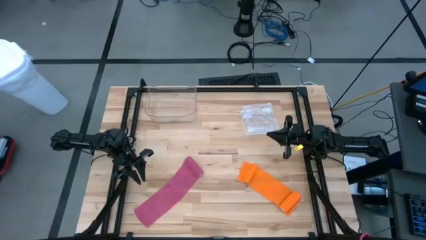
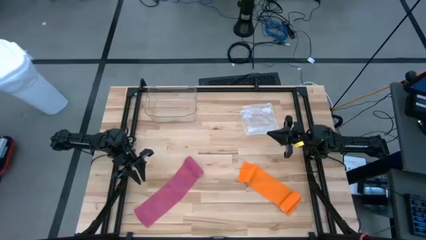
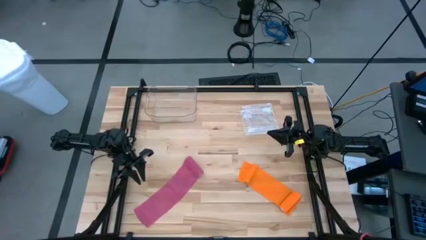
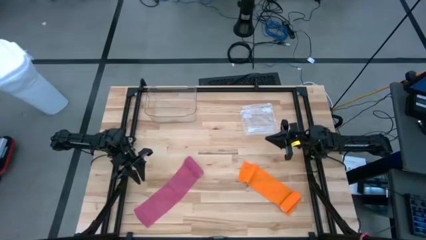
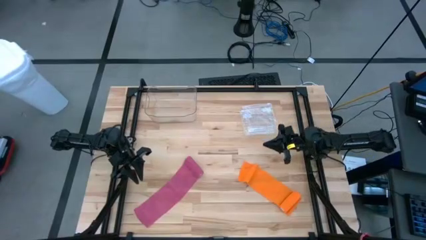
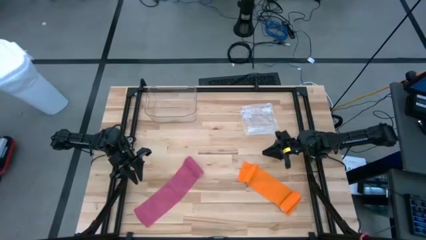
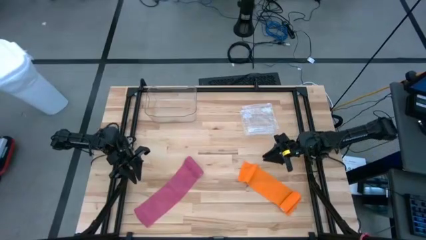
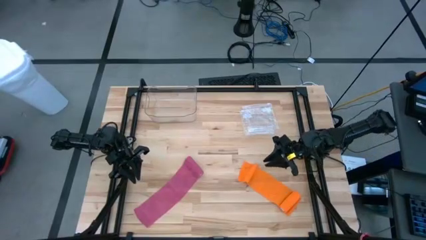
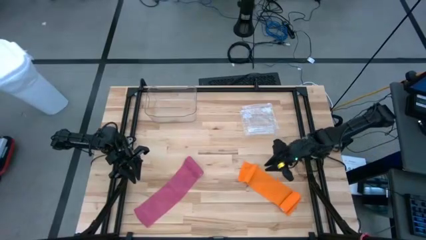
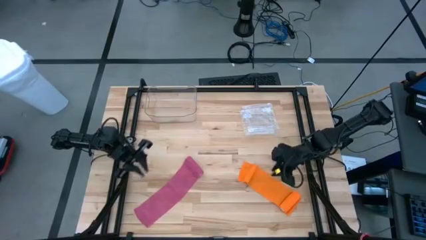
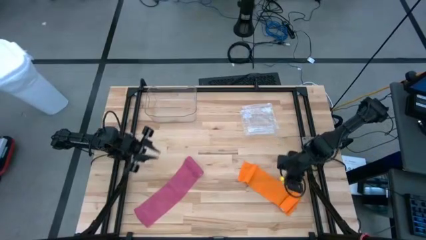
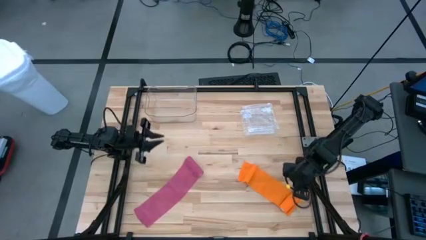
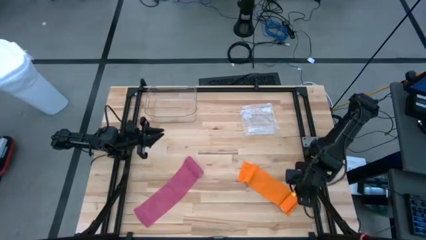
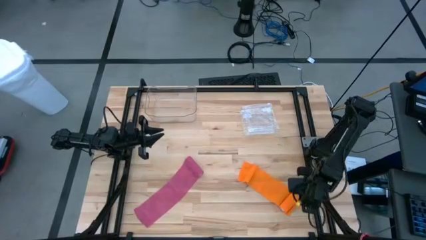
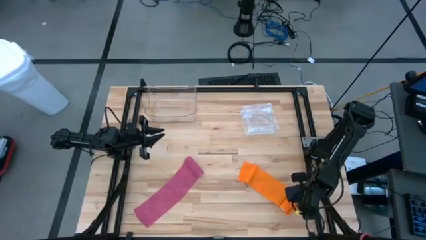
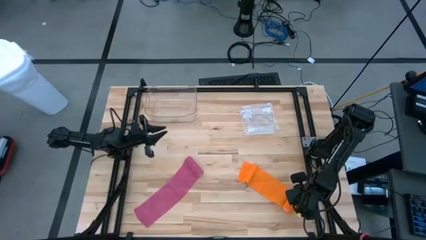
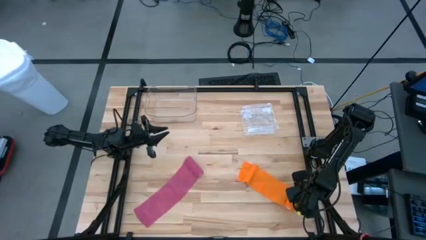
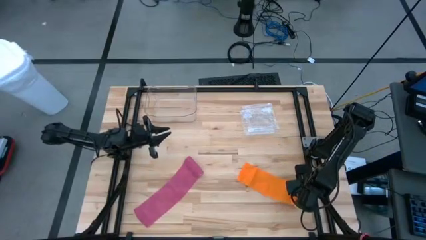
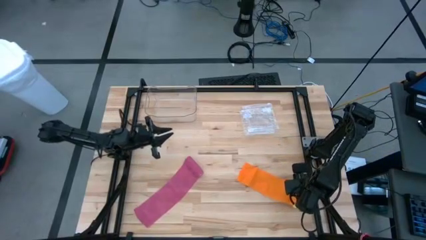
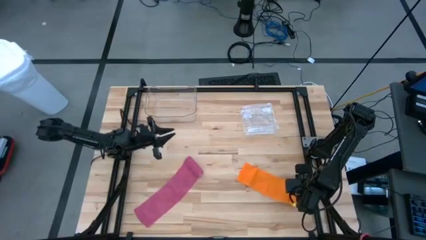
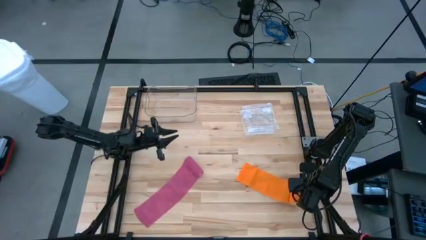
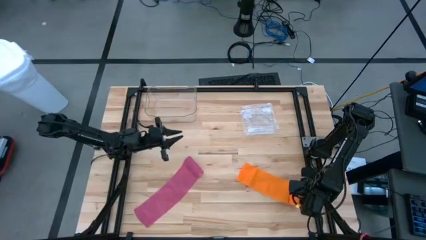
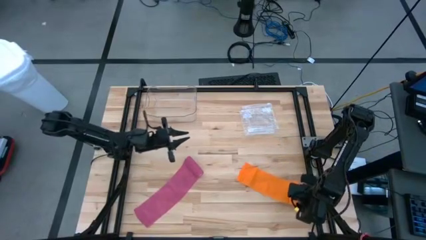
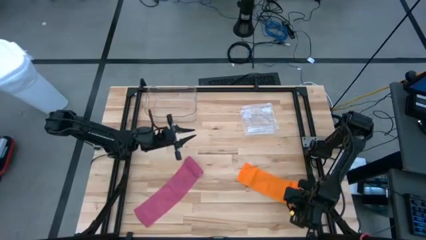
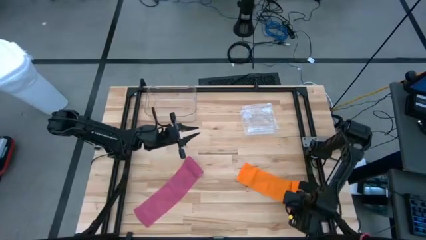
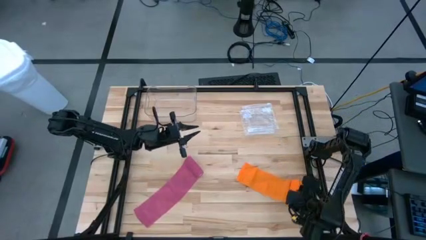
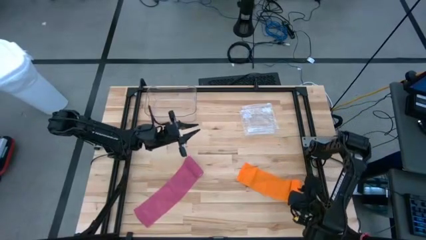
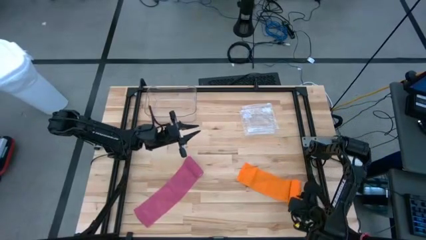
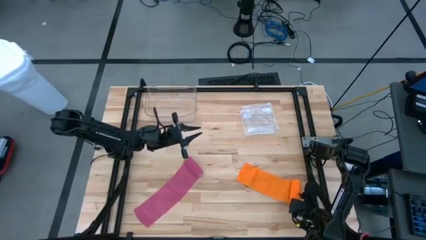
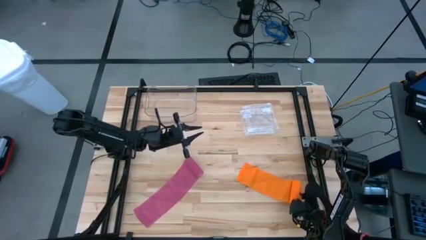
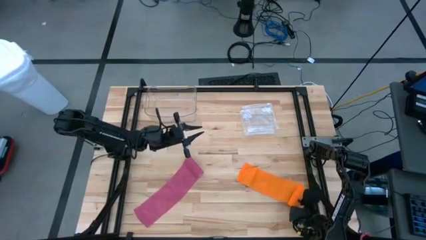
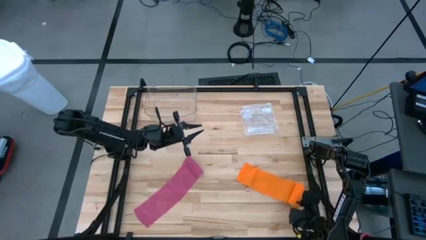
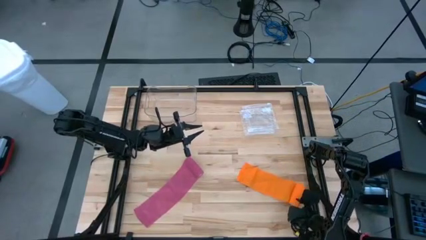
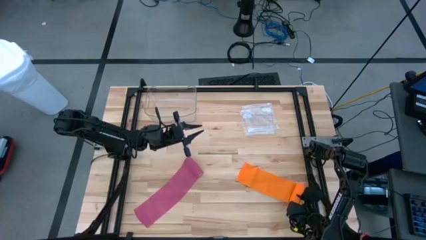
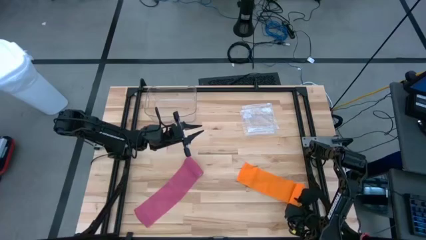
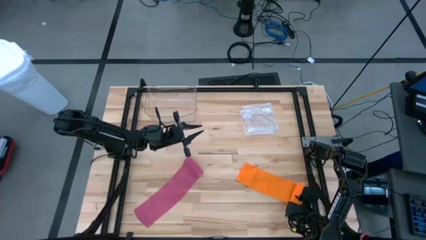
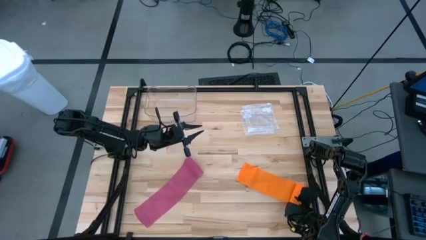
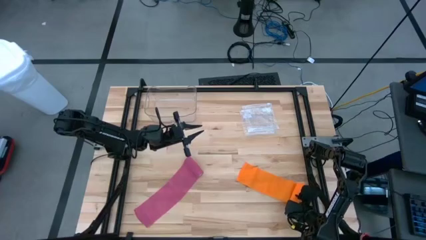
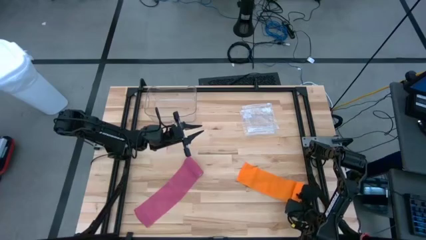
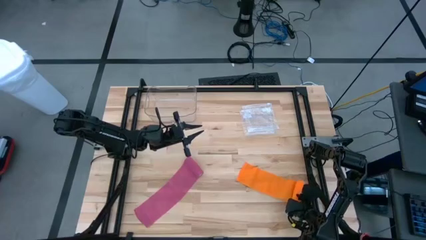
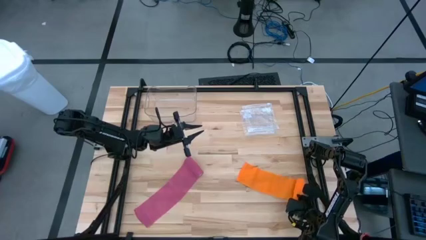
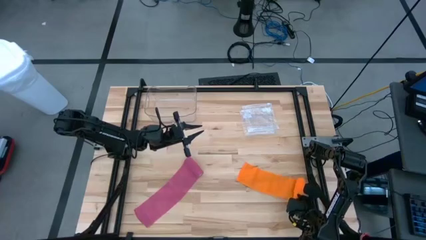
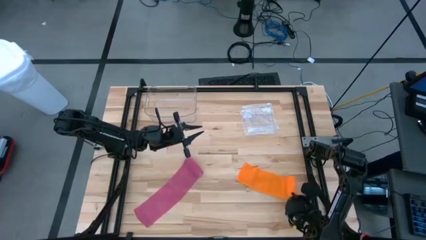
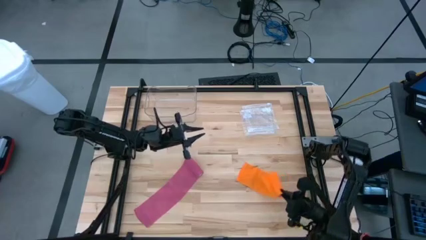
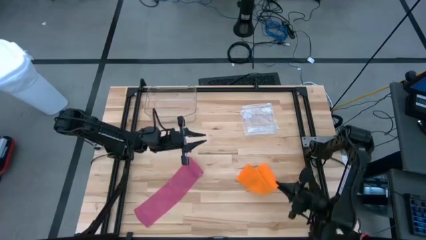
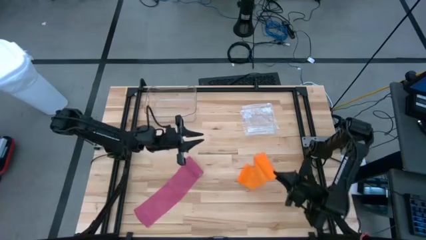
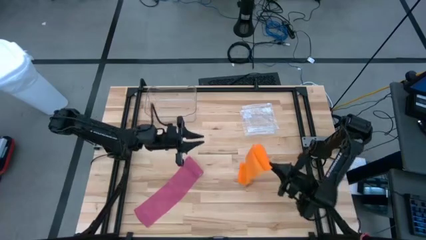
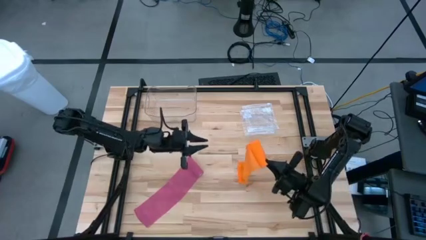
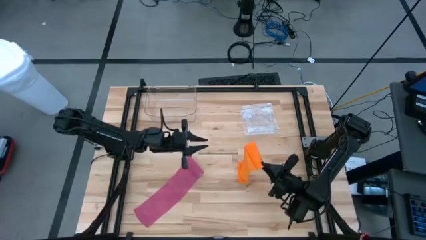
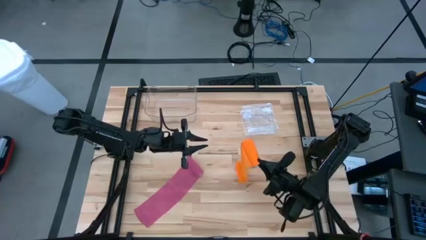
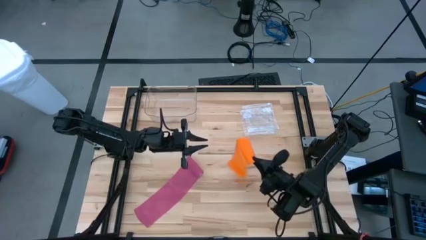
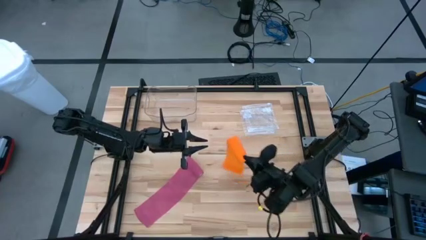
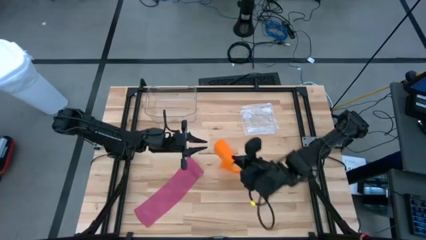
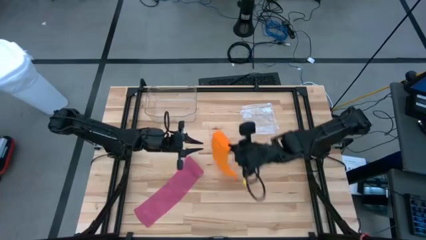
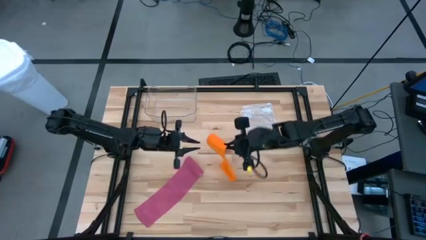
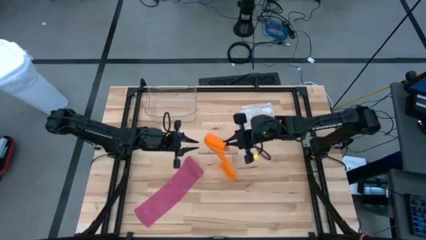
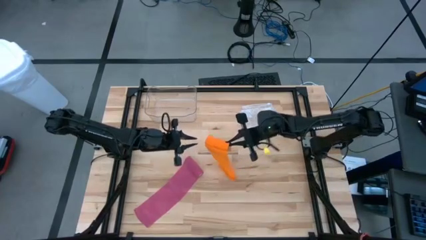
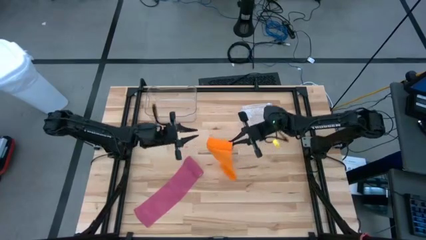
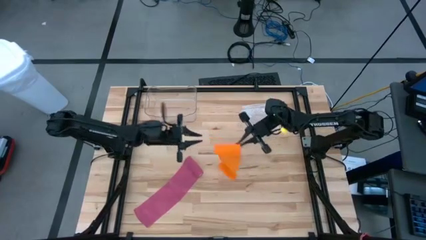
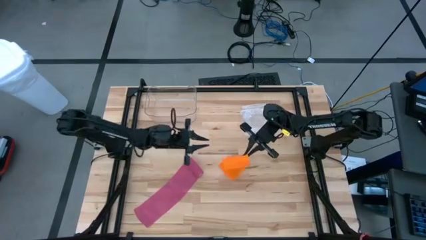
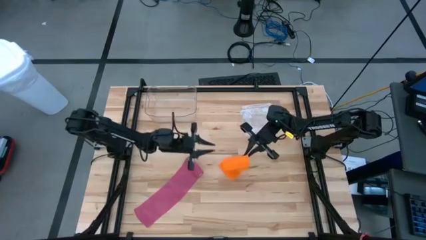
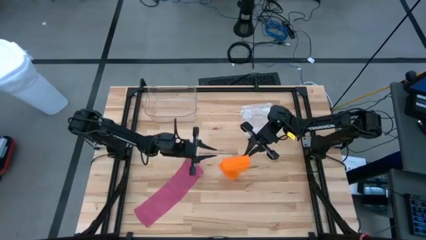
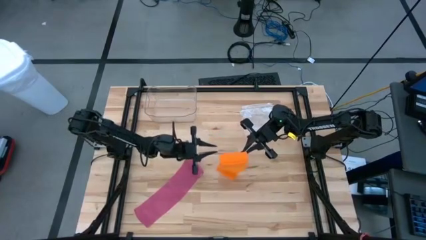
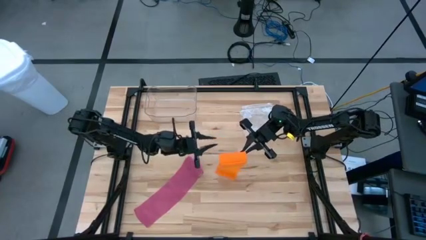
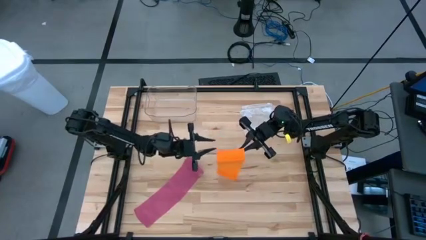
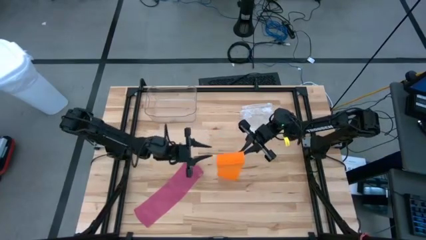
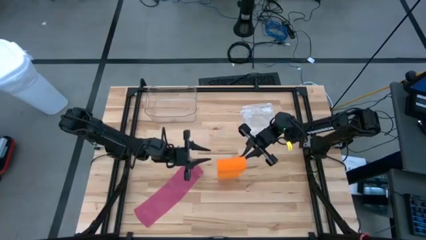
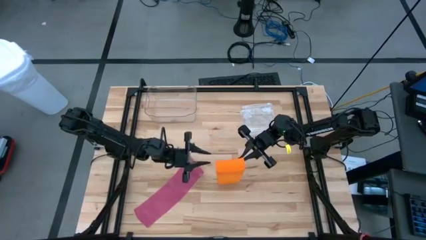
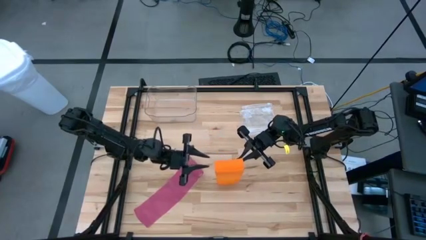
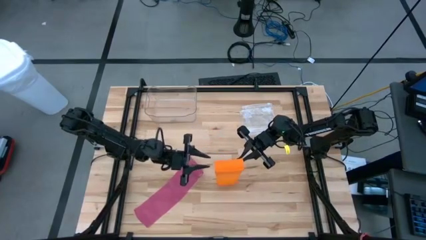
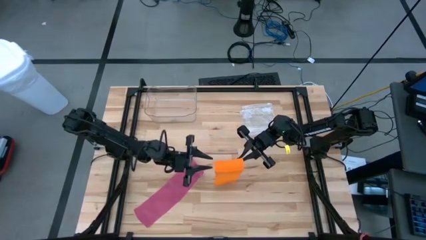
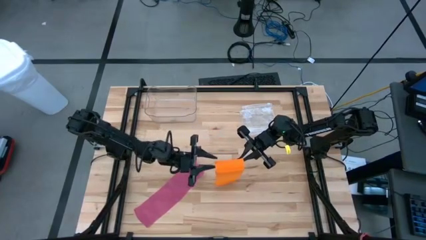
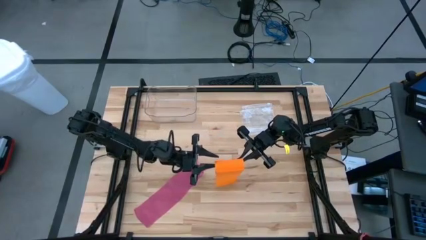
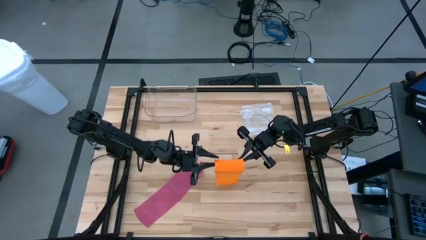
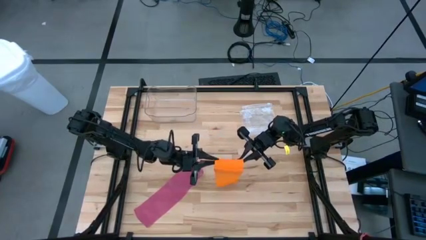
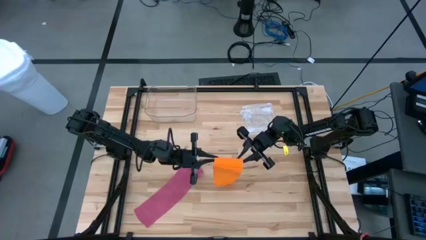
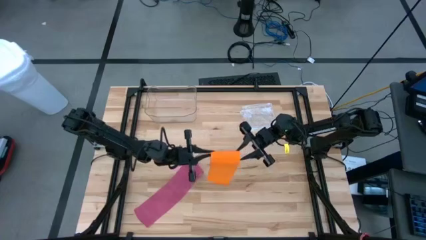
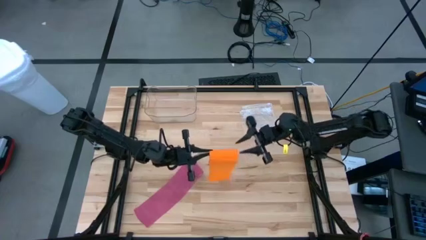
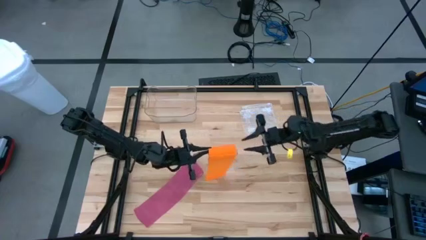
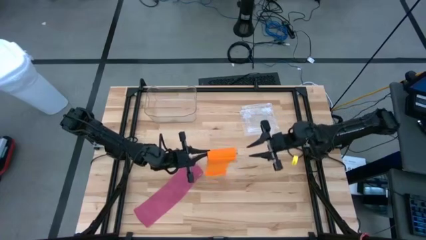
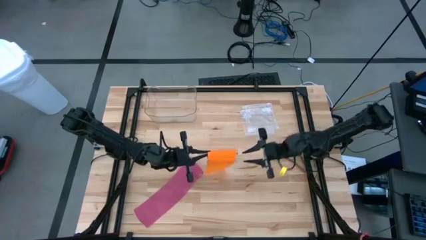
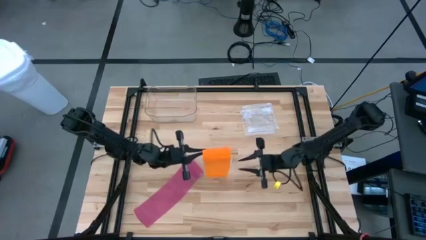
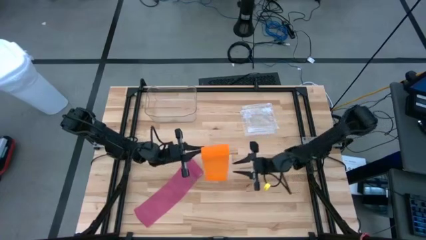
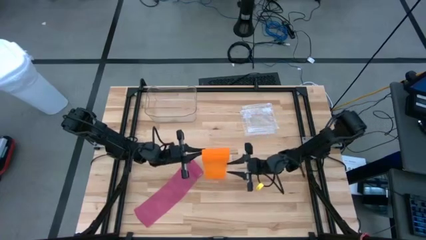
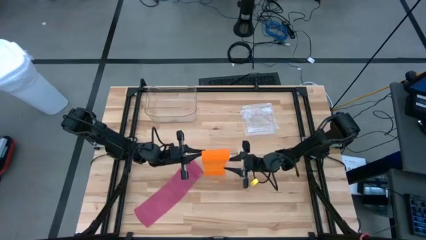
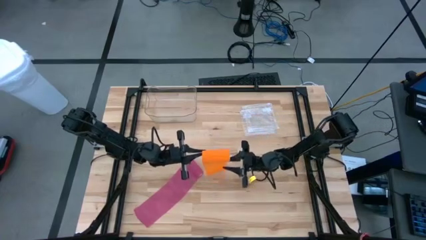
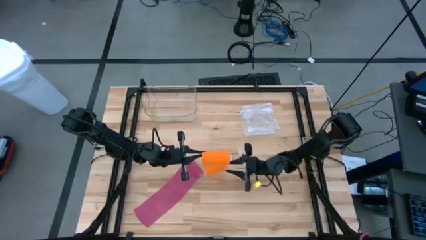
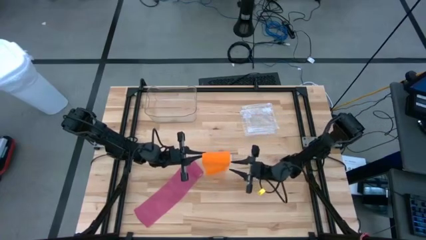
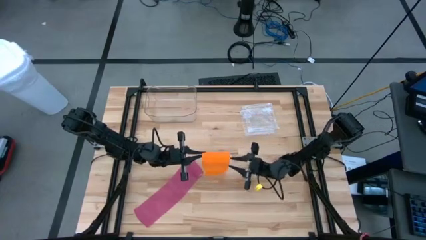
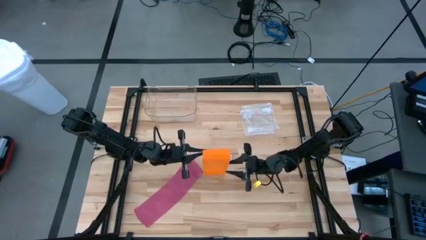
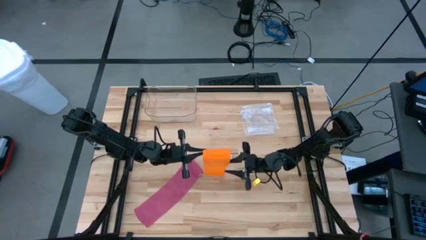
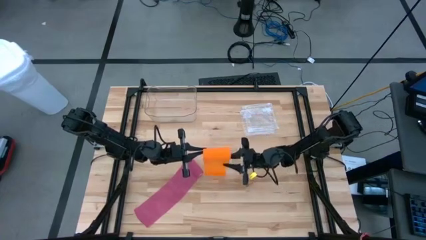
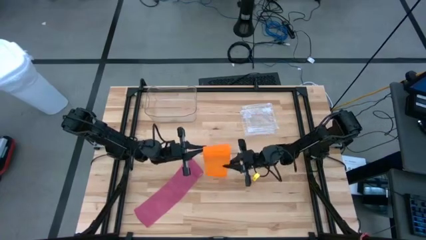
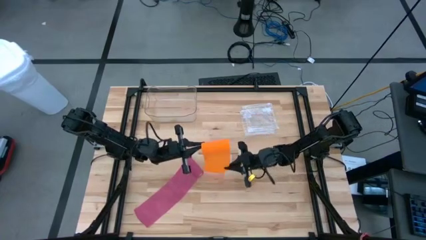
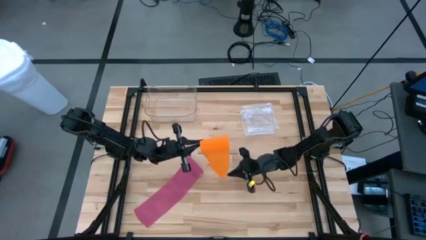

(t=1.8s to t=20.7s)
Task: Roll bandage
Roll the orange bandage
